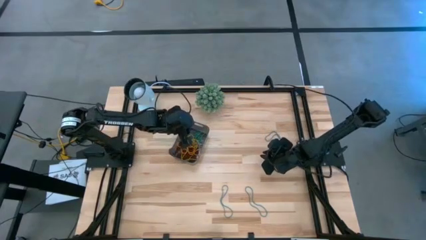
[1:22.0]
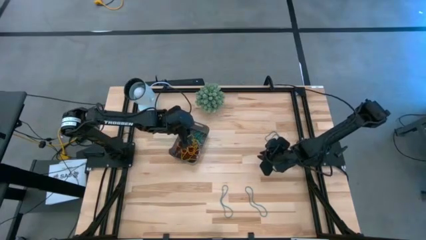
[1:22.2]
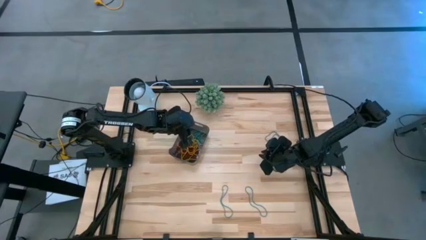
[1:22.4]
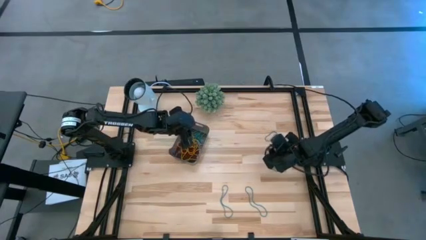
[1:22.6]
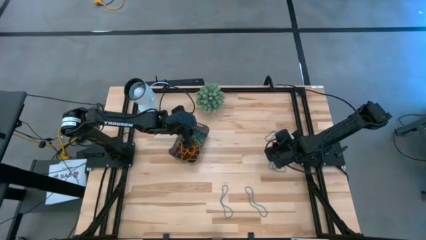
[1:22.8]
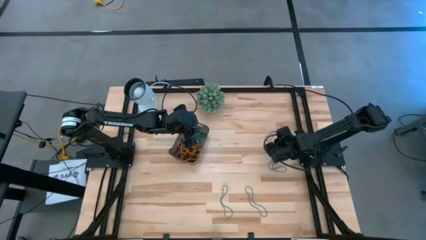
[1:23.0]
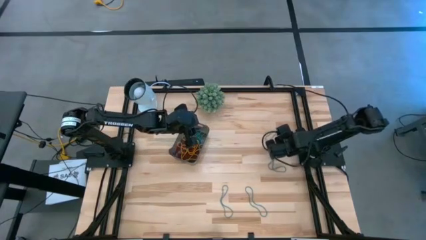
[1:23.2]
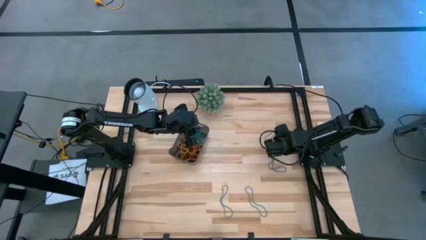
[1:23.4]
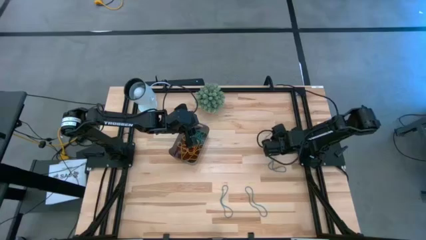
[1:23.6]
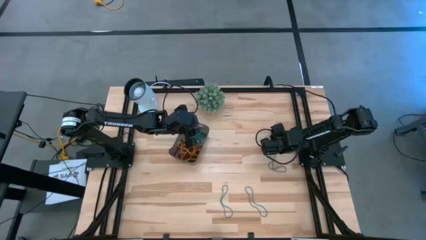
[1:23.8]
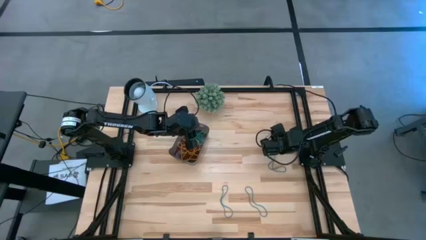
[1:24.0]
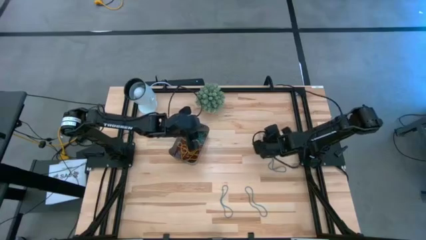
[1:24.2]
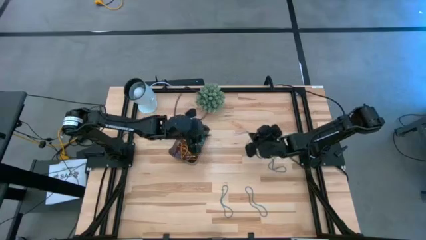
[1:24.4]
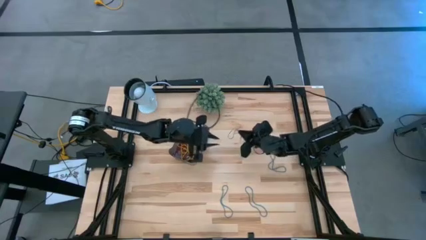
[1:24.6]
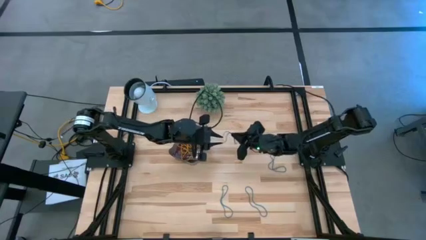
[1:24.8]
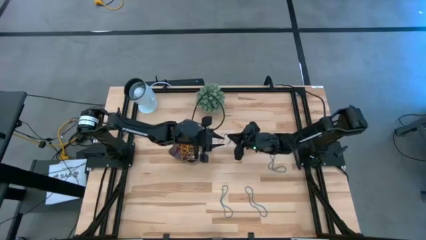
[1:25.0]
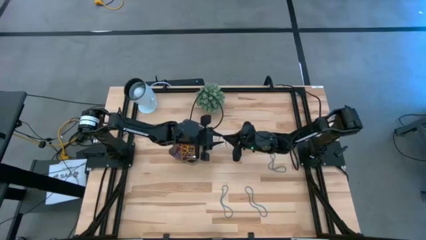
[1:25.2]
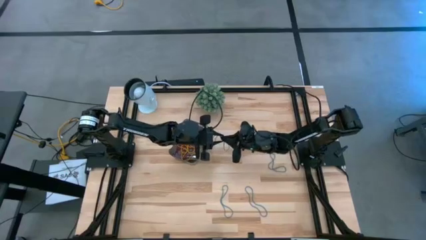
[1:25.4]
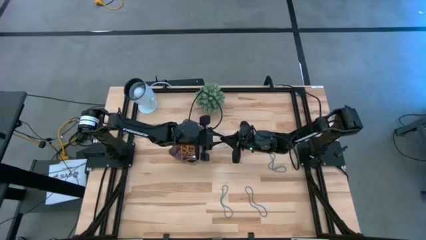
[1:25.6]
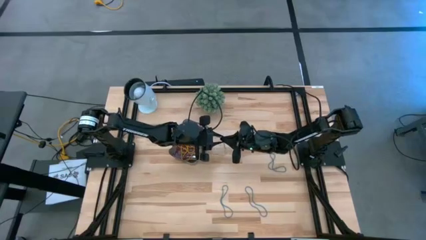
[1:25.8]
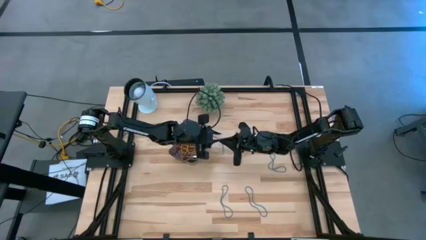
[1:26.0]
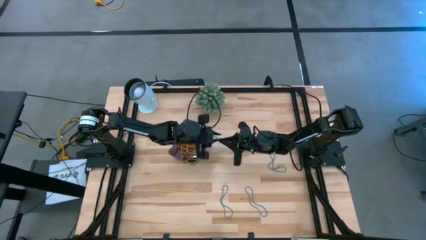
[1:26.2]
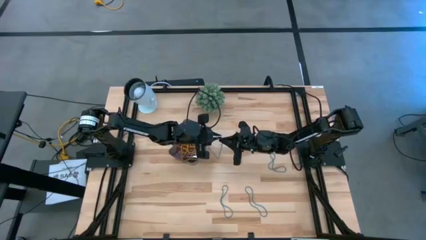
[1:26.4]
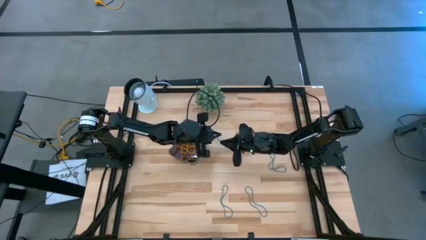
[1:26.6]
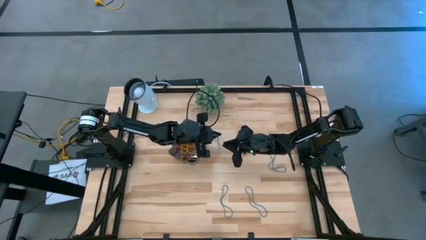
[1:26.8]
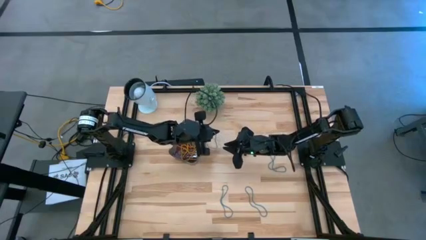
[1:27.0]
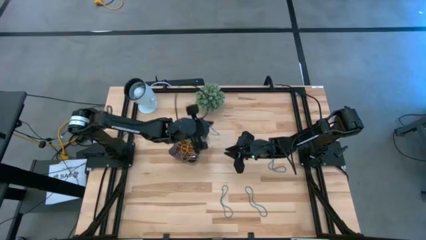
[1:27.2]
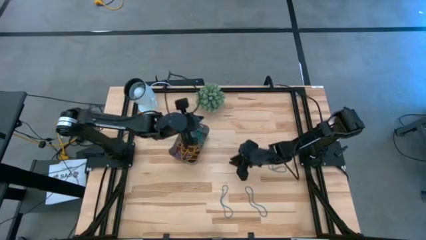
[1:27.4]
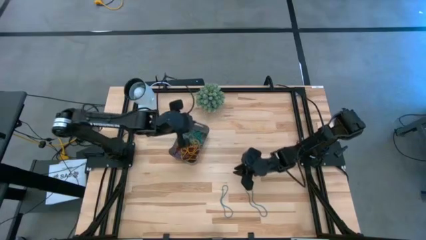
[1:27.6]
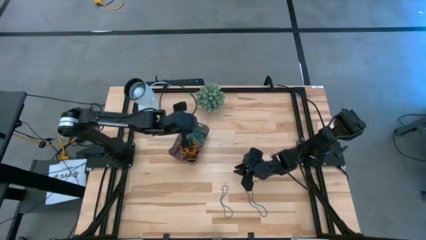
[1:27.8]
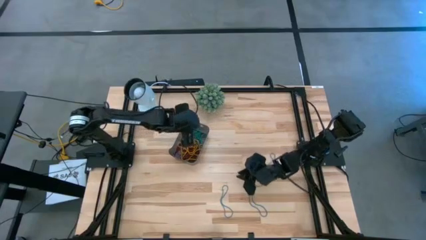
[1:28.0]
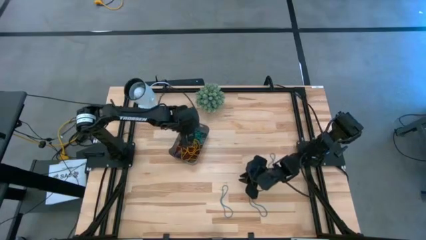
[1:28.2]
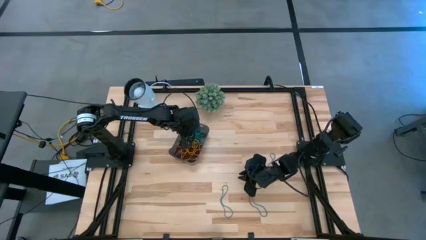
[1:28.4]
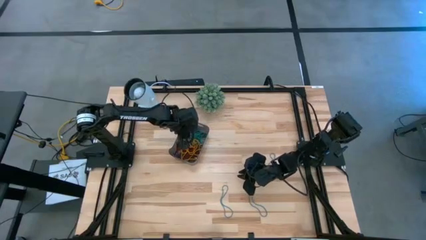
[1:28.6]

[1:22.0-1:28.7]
Task: Pick and place items into bin
Put the blue rubber band into the black bin

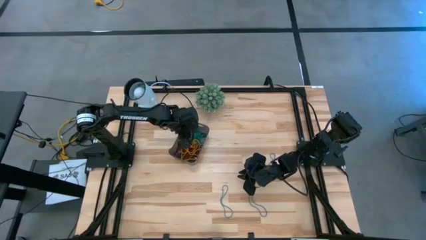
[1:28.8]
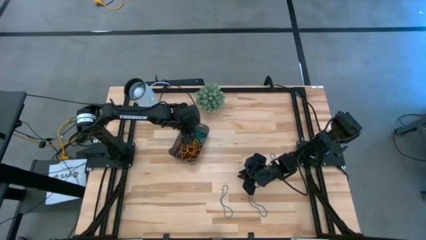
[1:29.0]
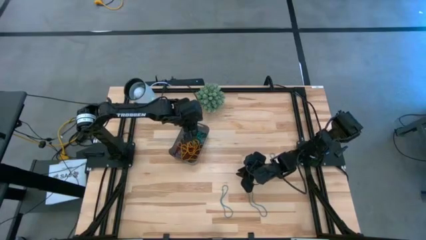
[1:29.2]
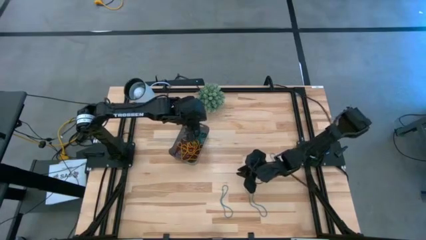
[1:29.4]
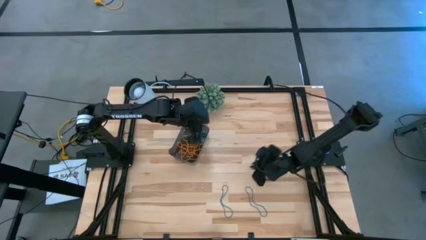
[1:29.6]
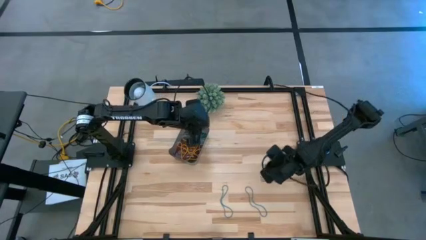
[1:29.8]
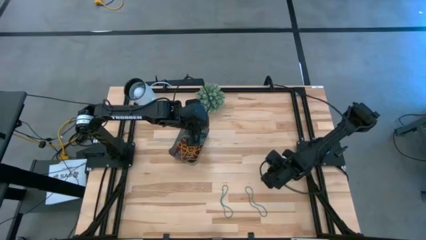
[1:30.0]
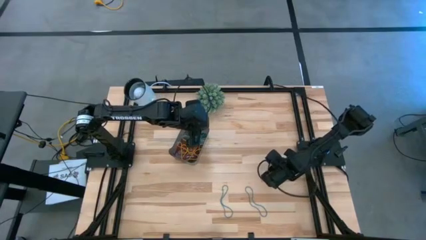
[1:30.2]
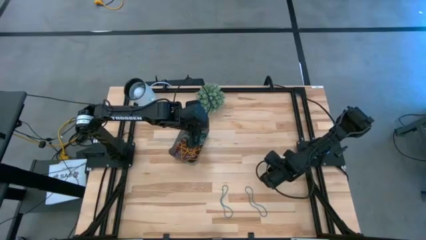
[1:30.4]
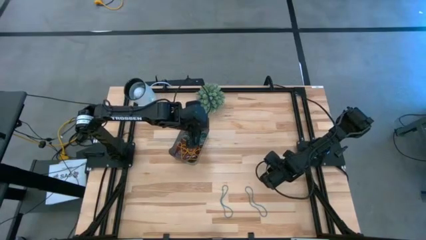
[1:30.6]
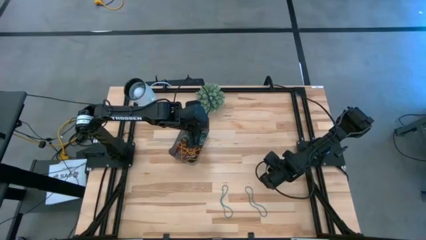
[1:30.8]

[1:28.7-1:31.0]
Put the blue rubber band into the black bin

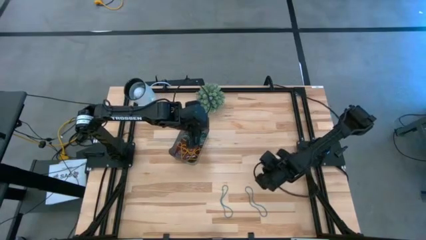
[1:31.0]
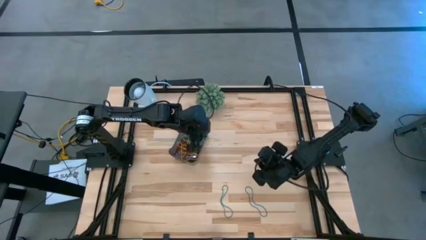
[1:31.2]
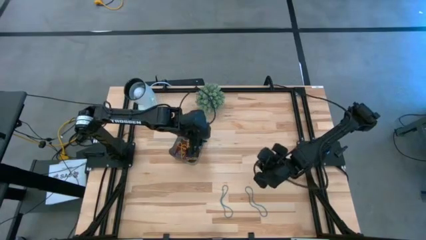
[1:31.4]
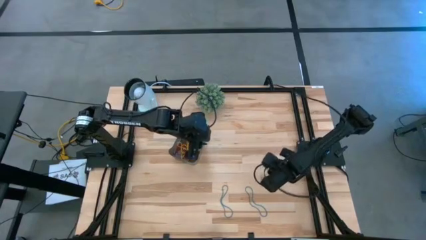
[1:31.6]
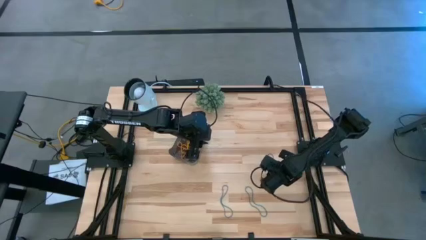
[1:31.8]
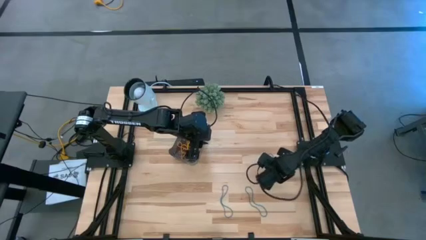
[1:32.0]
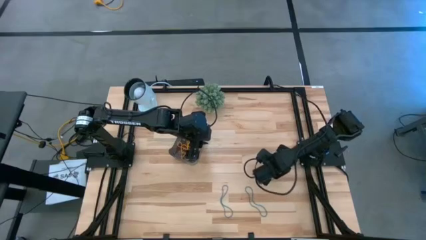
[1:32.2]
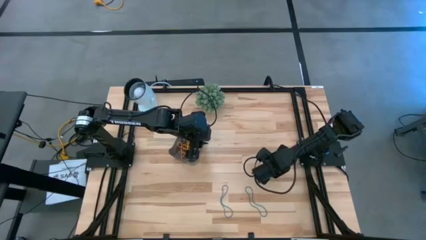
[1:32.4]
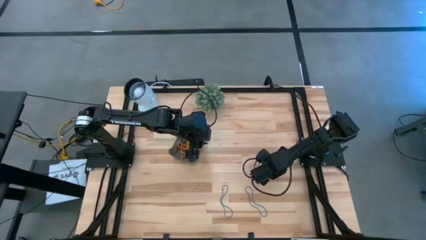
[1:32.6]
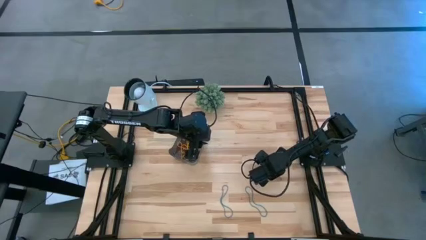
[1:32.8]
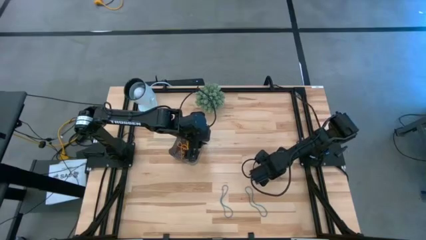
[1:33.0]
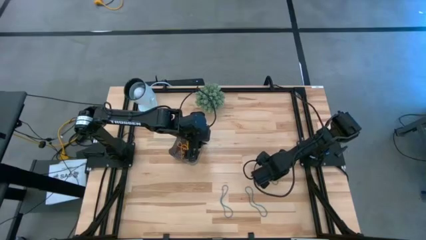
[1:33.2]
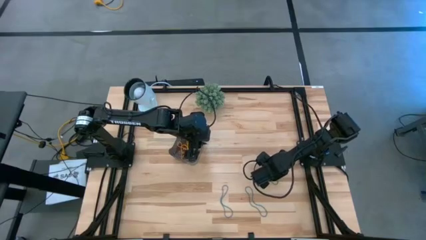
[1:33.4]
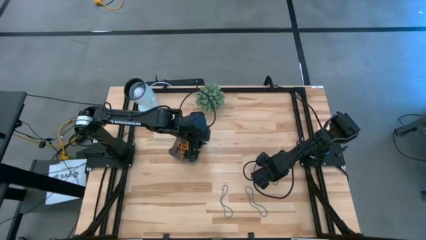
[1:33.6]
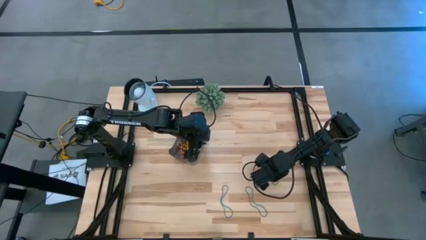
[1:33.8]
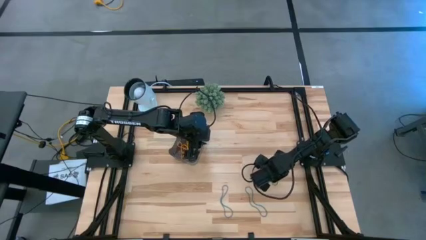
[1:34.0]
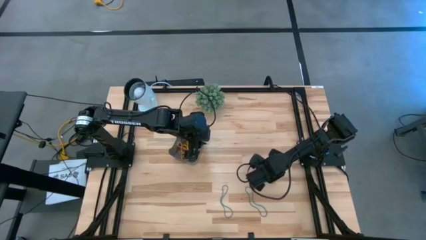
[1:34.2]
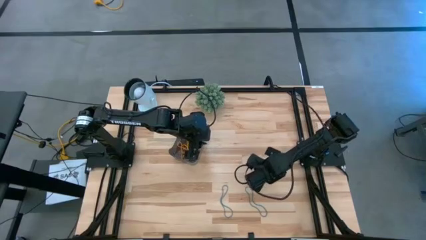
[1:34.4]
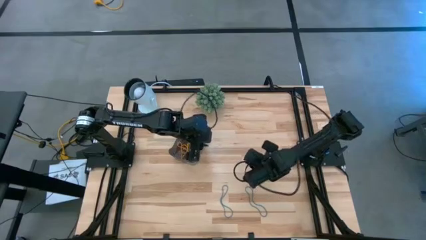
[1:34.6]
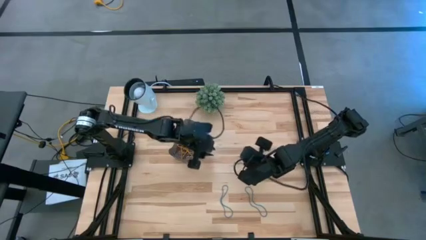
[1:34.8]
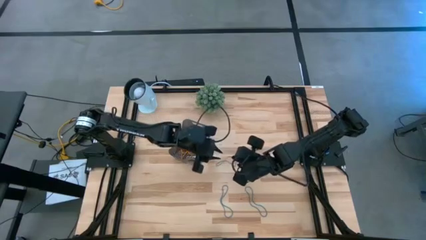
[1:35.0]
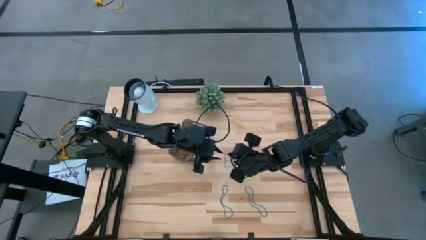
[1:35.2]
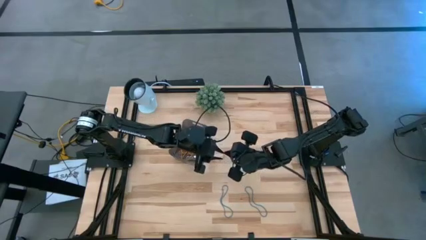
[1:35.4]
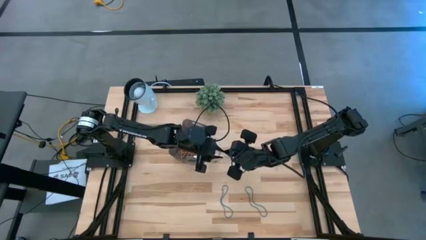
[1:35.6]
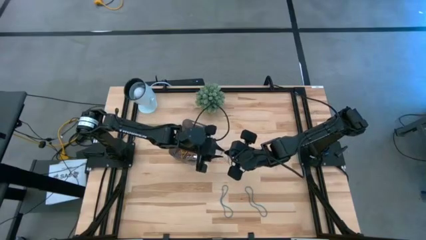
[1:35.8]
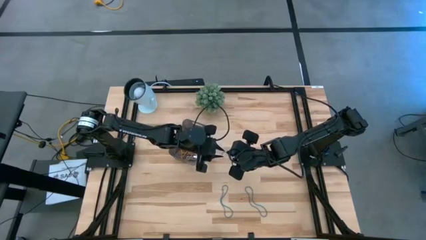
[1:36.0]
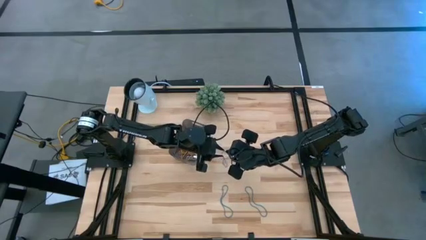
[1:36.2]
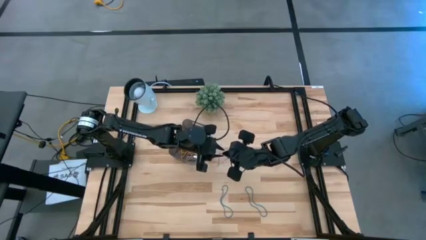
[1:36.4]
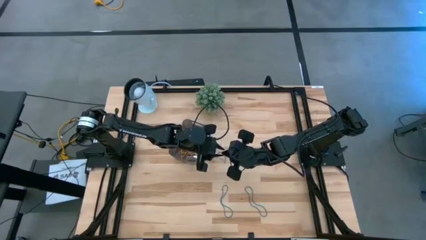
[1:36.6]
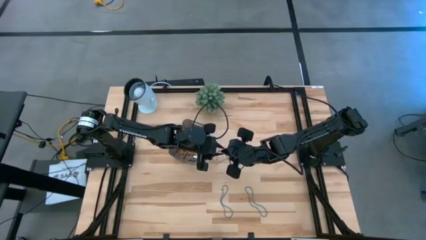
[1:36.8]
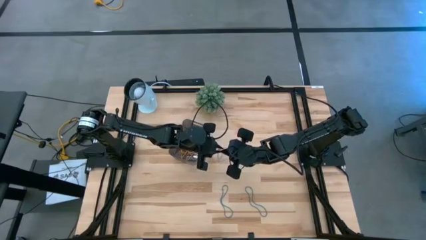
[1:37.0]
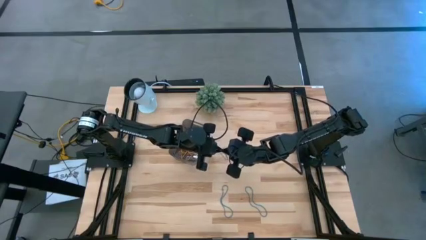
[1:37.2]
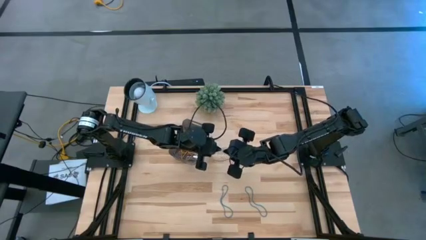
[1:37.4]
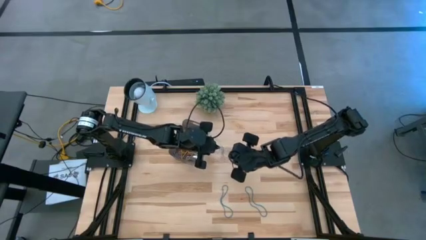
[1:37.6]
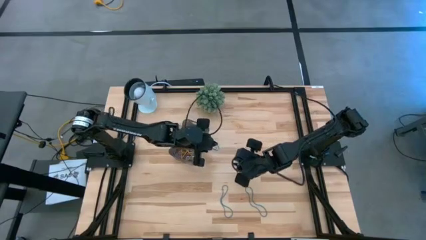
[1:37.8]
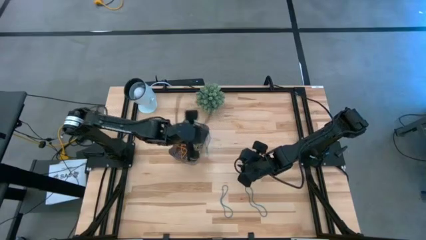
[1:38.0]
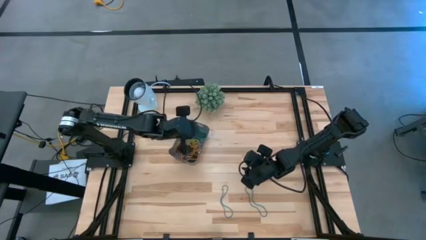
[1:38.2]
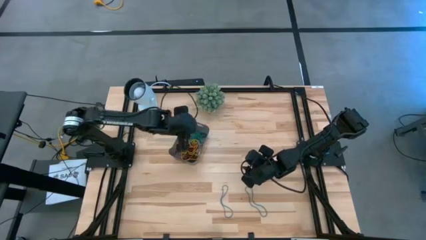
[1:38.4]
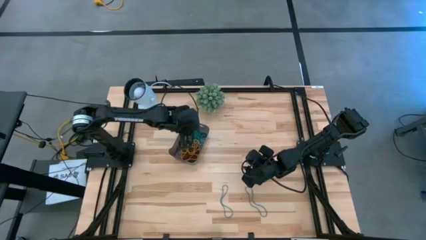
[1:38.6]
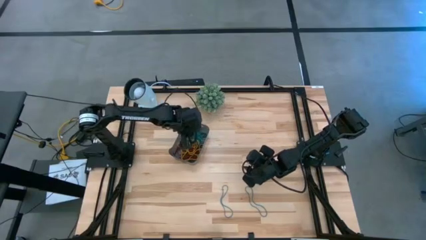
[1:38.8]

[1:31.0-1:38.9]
Put the blue rubber band into the black bin
